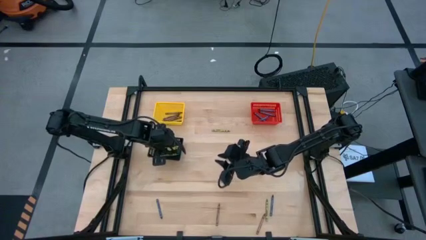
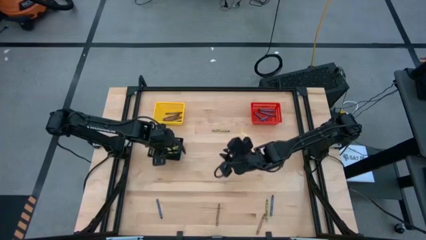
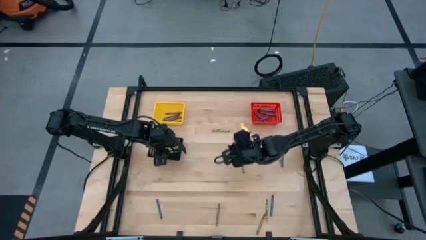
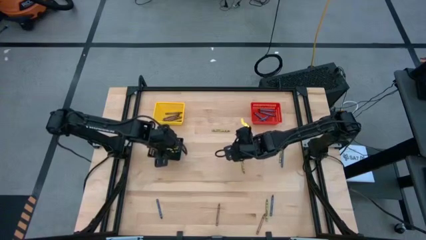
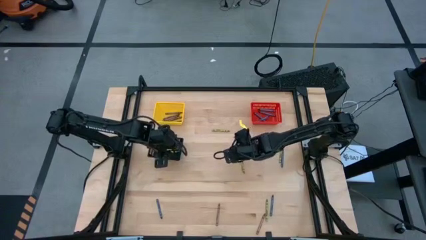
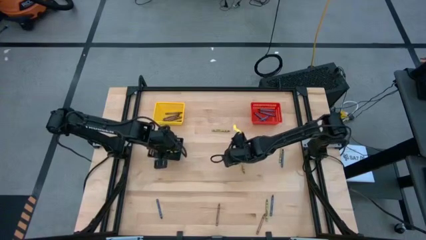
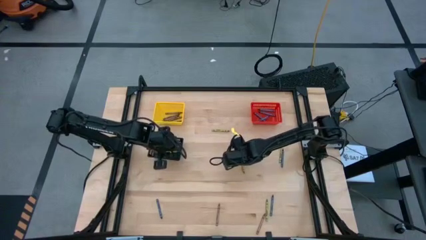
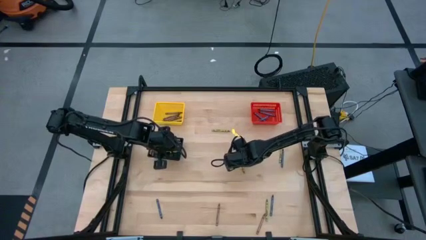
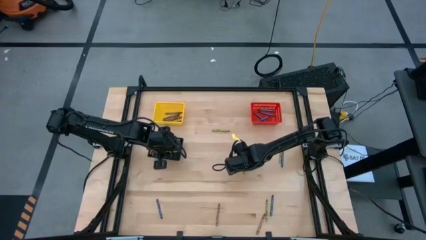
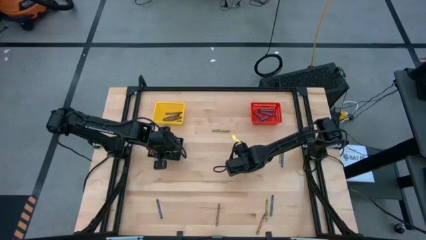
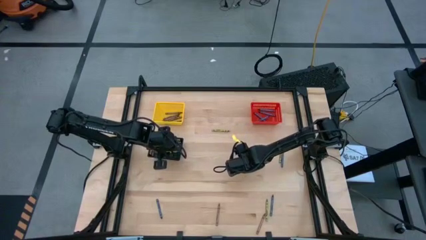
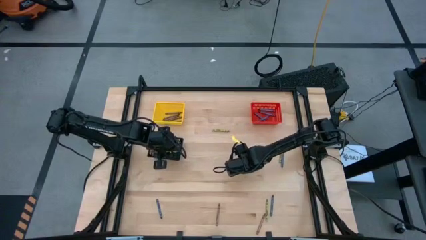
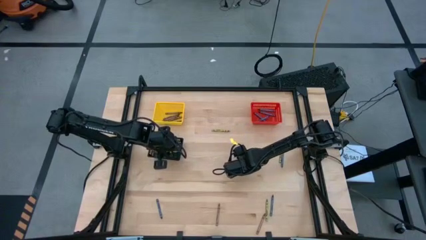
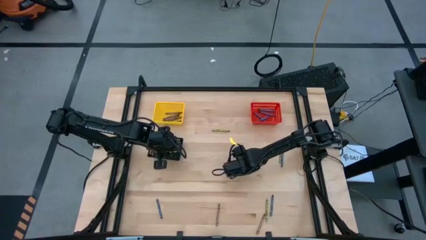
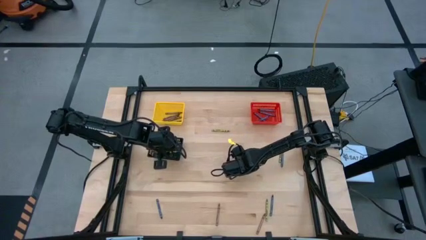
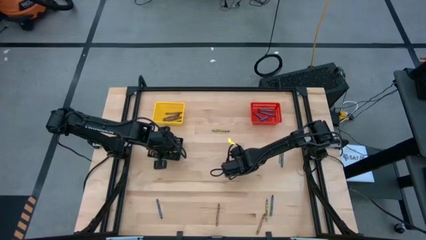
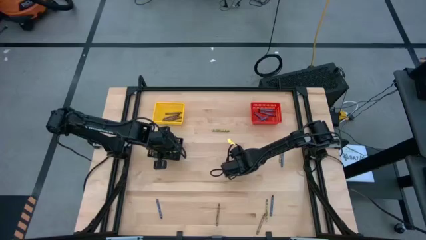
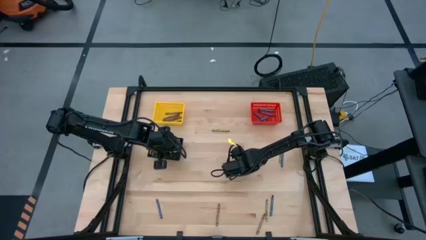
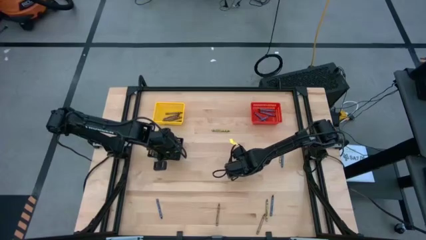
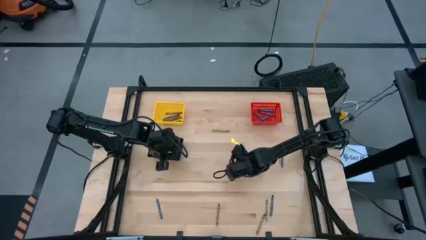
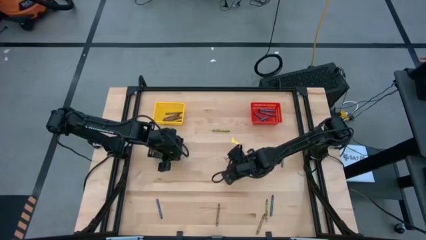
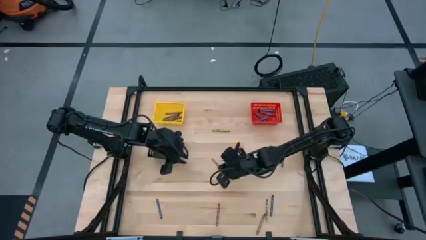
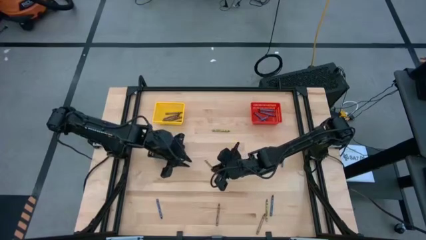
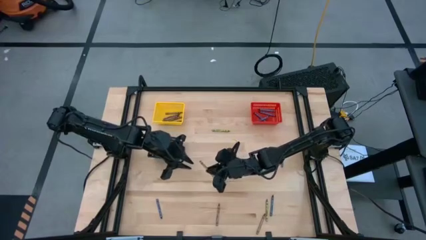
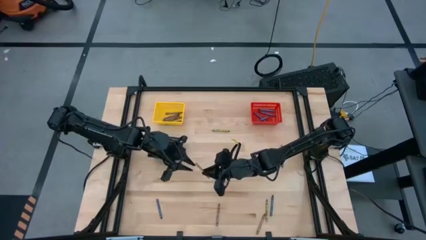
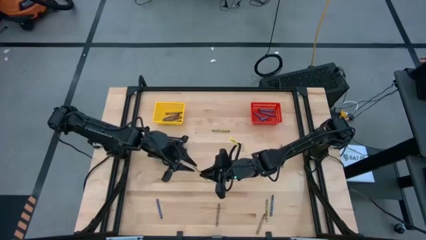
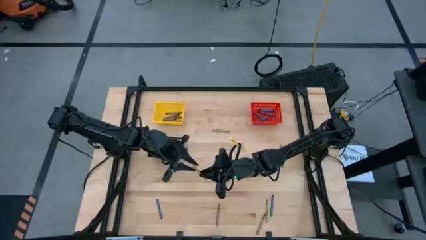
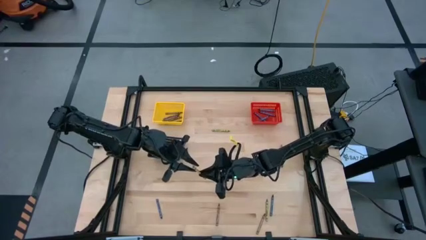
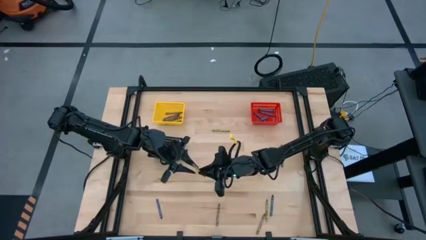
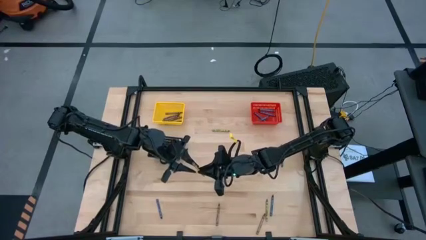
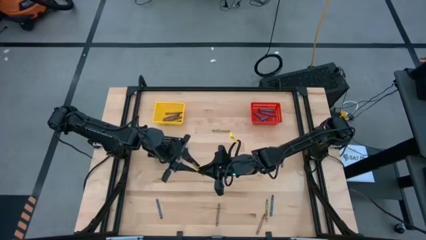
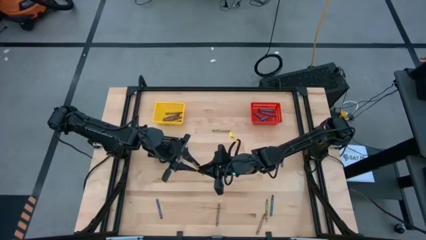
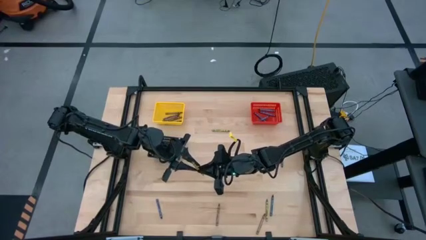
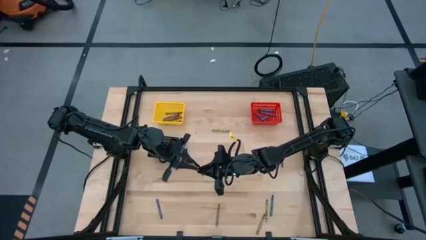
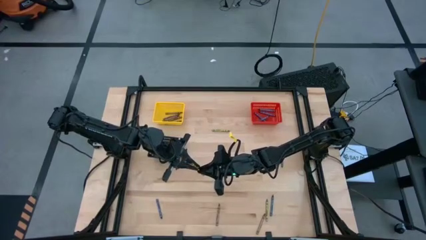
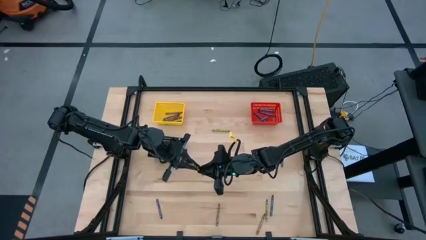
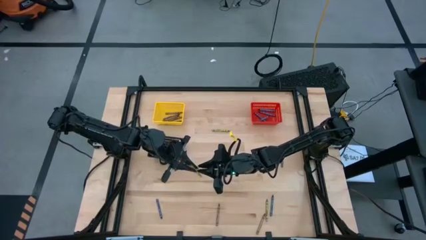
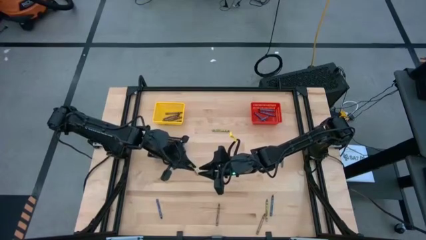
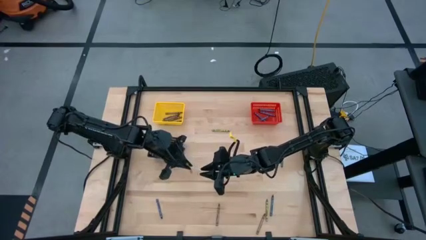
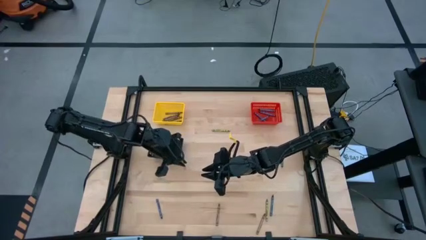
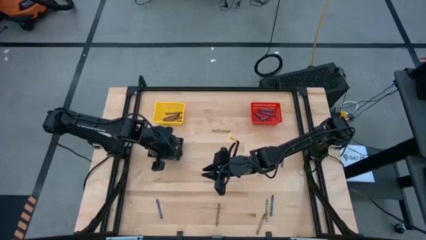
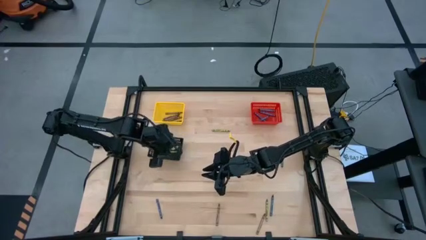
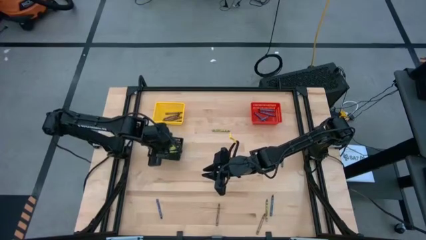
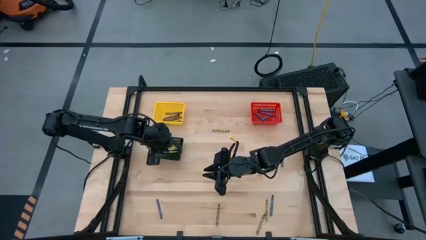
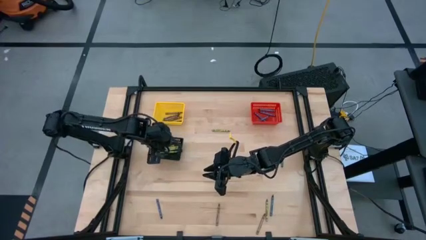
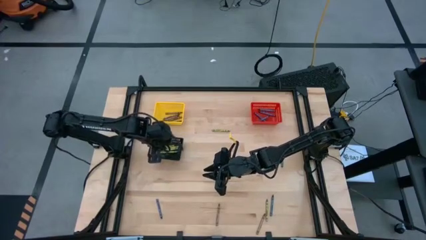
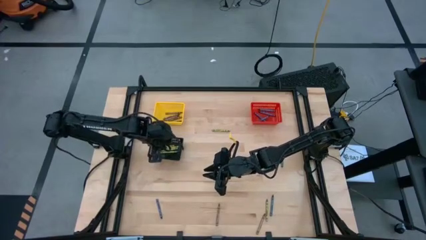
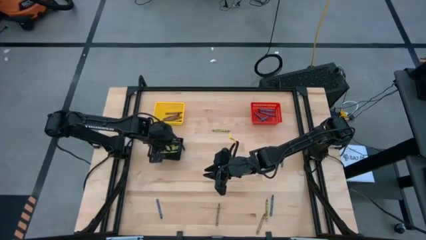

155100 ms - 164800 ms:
Task: Sort crayons
Put the green crayon into the black bin

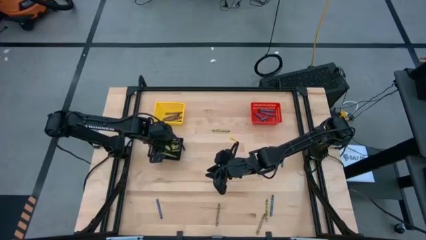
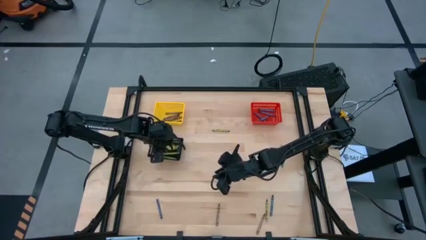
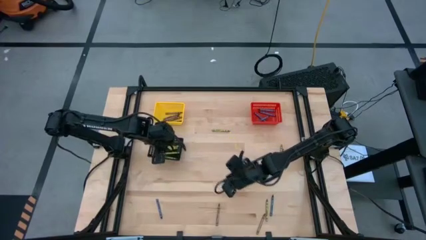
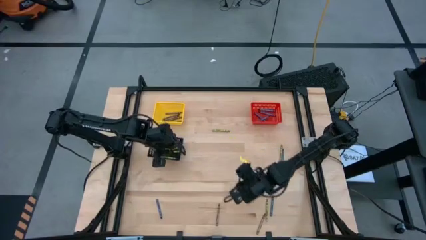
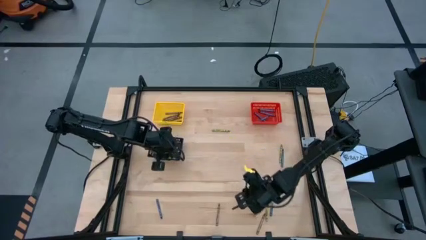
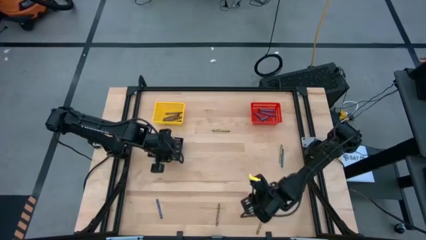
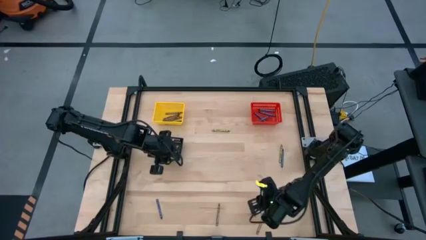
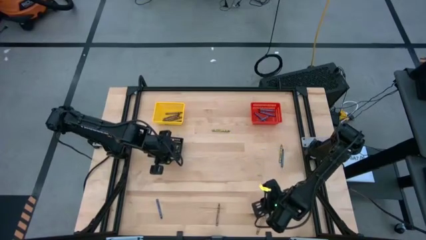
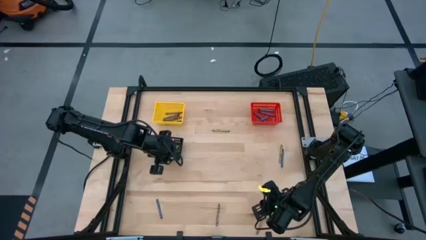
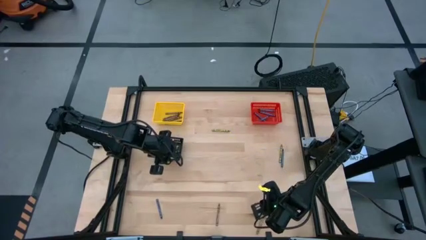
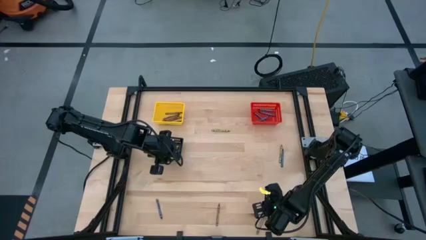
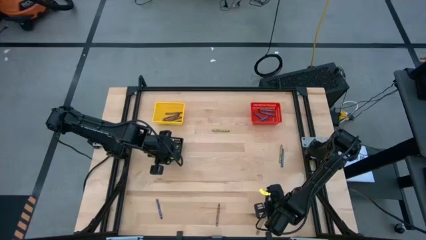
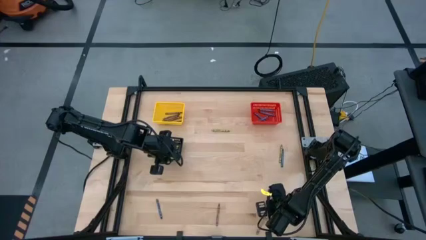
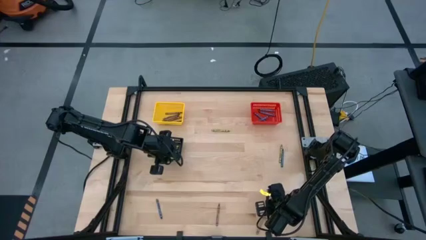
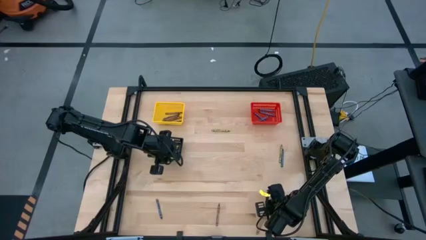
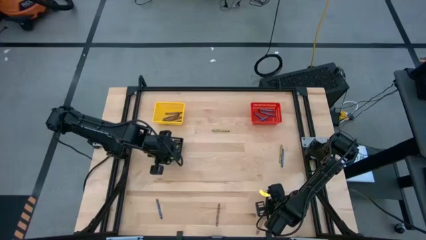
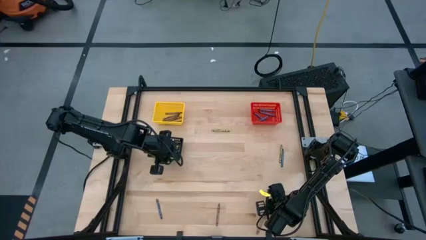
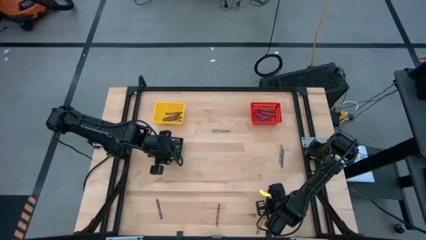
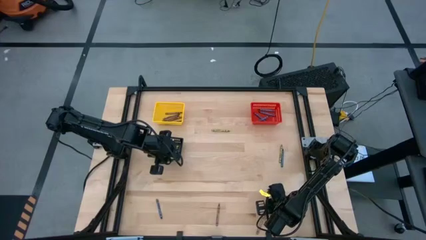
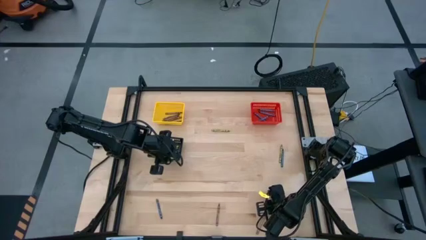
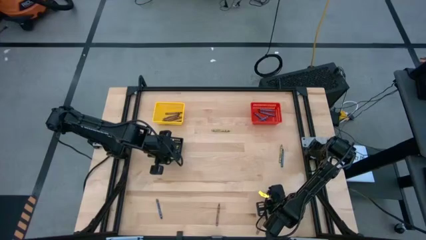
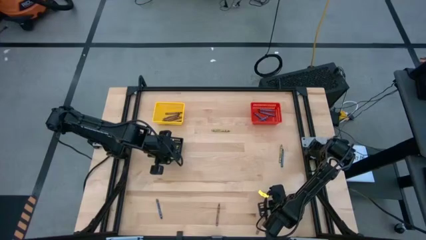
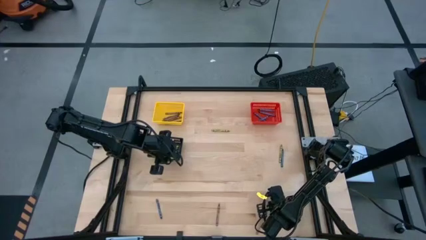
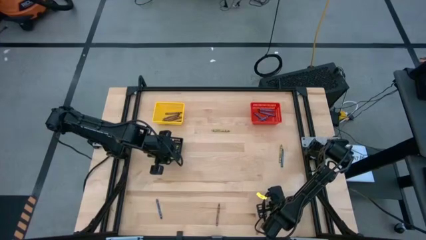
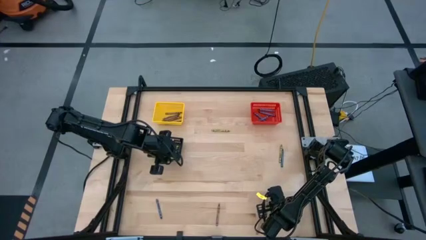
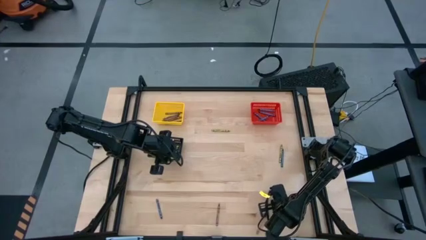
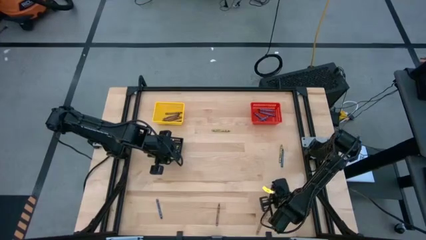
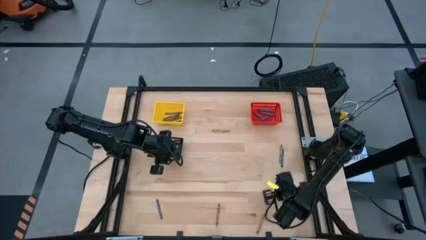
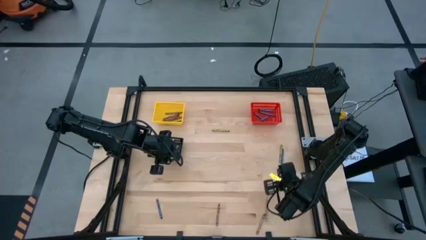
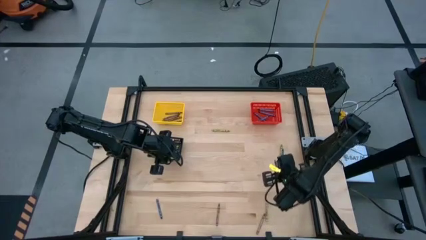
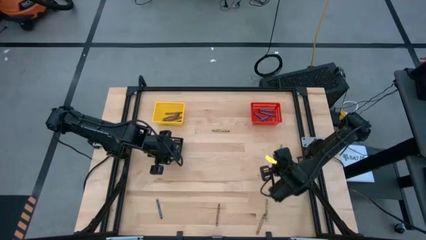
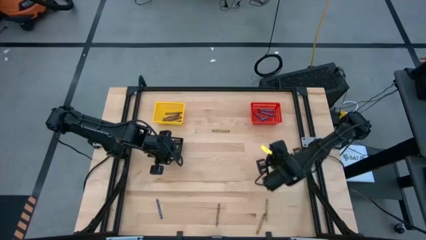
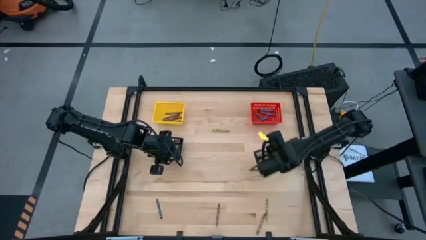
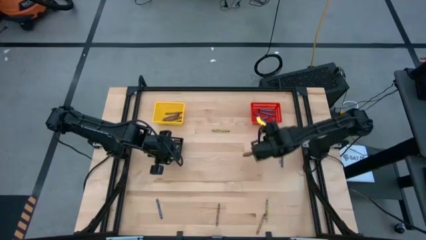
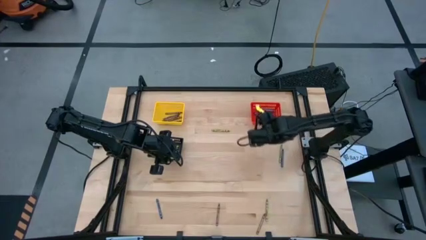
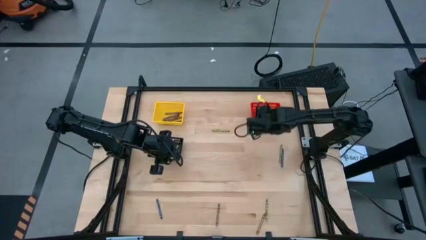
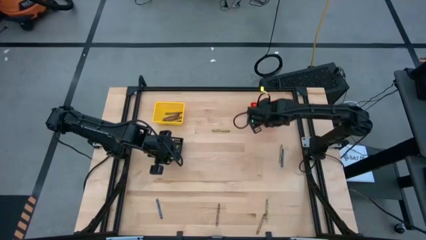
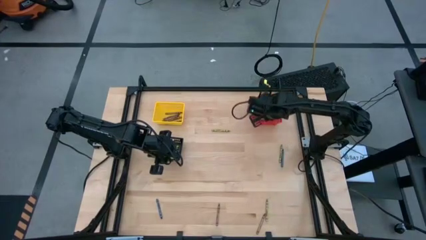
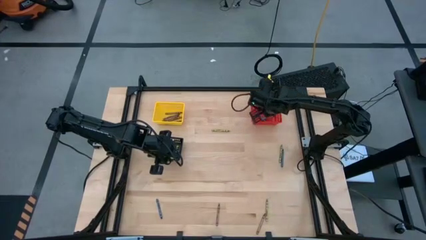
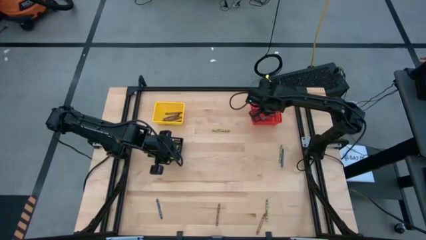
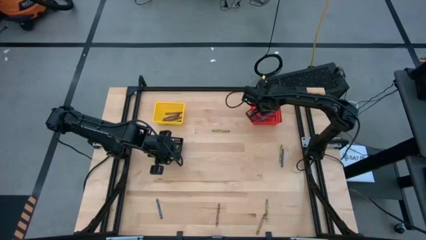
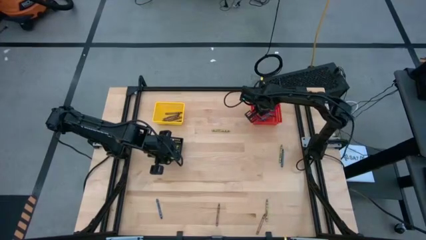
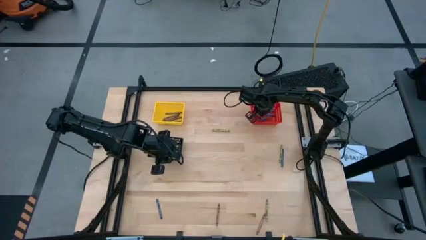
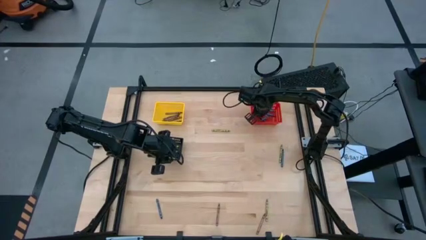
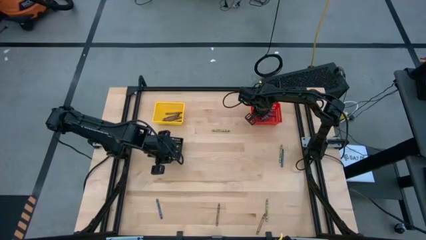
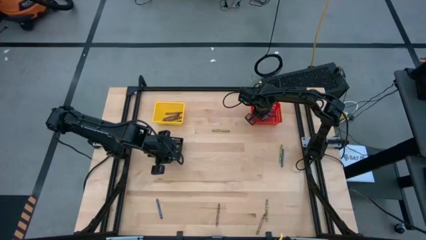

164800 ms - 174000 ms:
Put the blue crayon into the red bin
